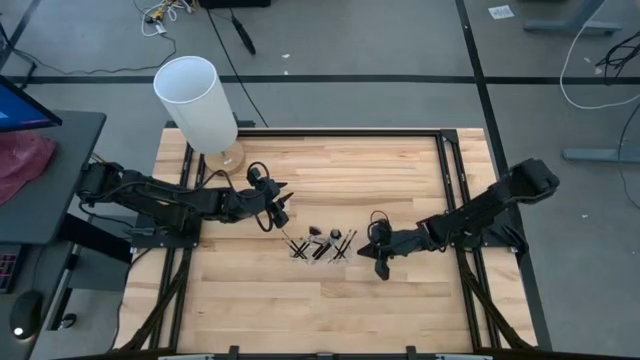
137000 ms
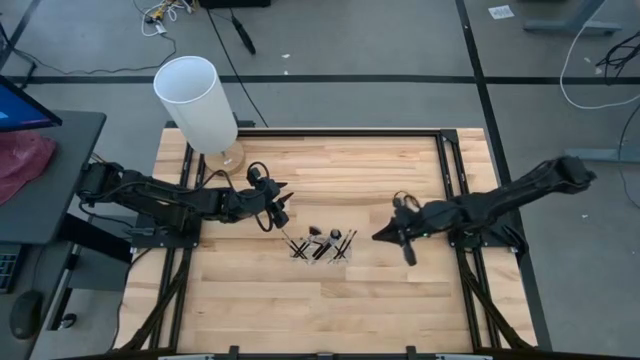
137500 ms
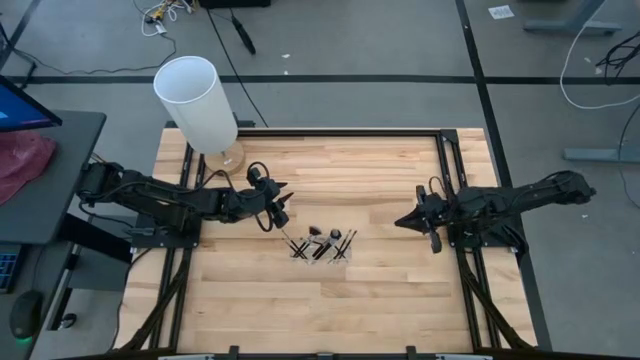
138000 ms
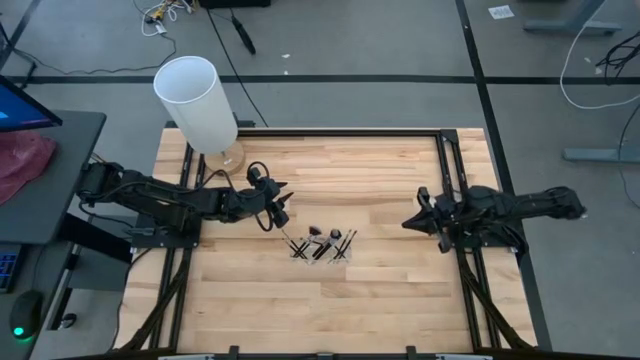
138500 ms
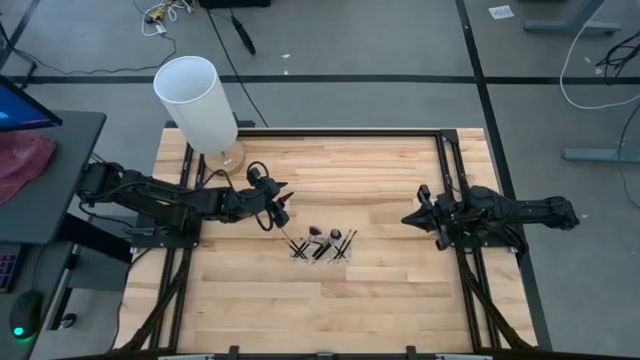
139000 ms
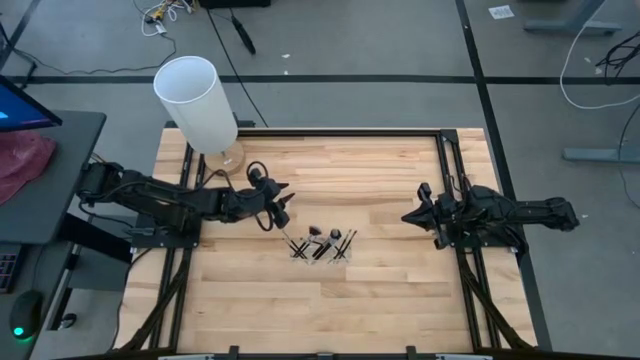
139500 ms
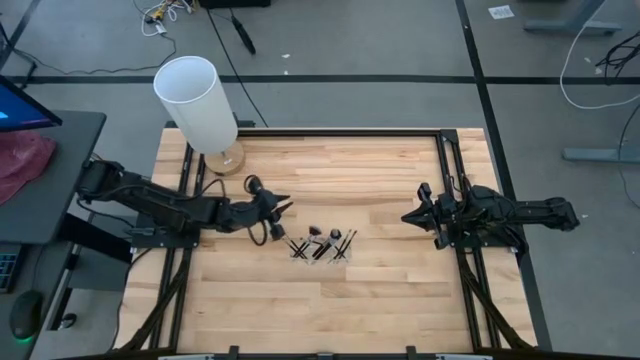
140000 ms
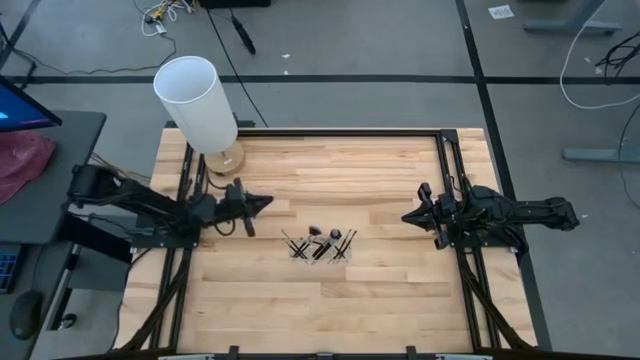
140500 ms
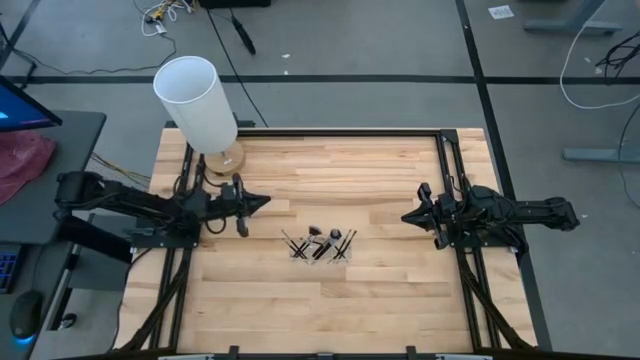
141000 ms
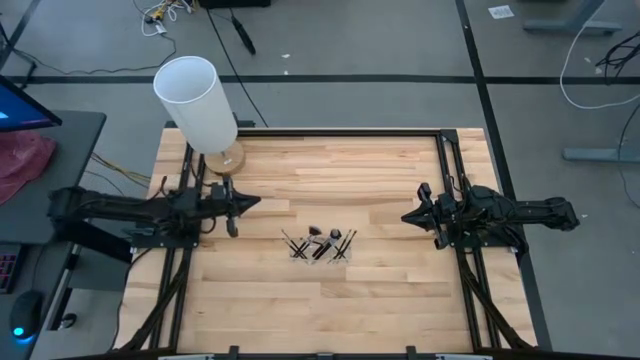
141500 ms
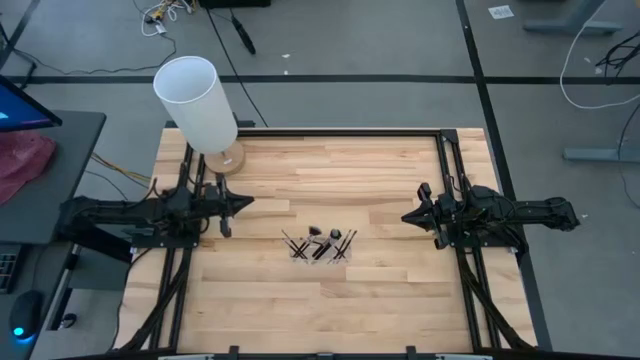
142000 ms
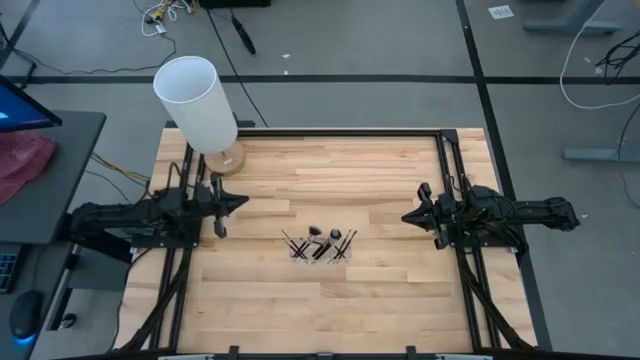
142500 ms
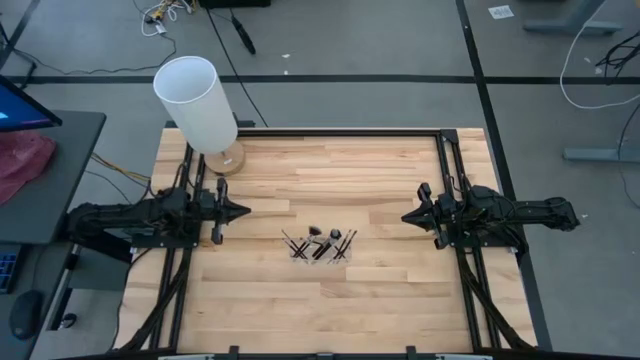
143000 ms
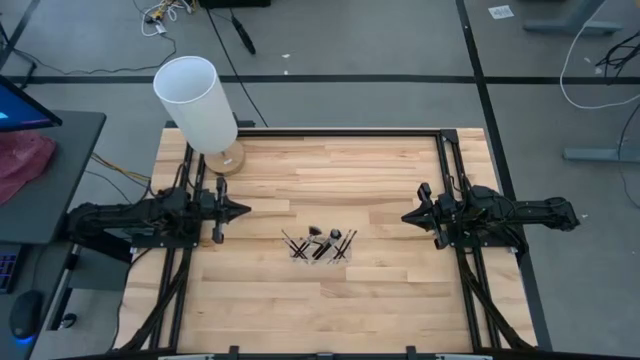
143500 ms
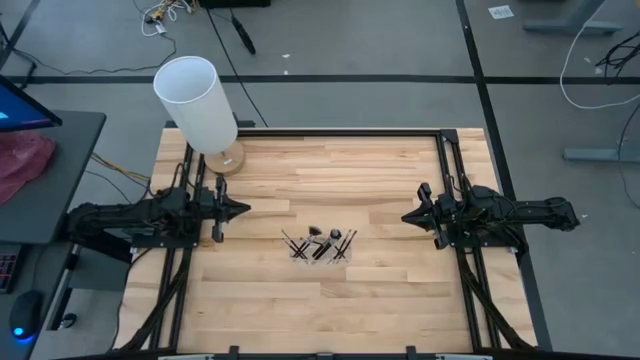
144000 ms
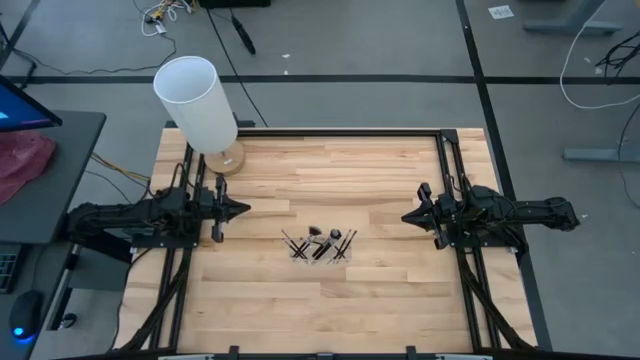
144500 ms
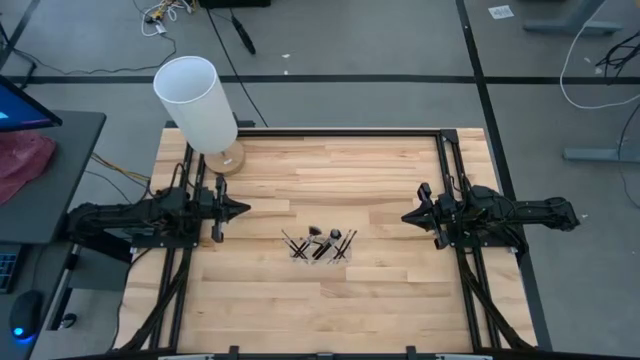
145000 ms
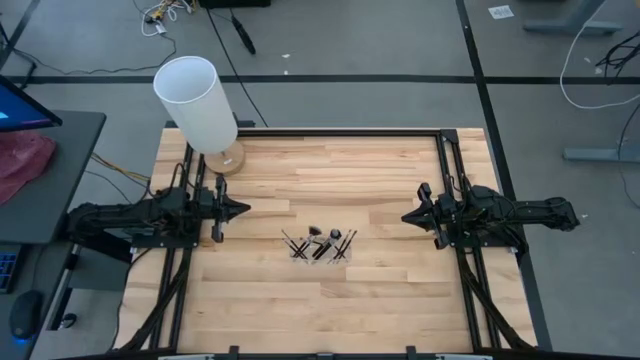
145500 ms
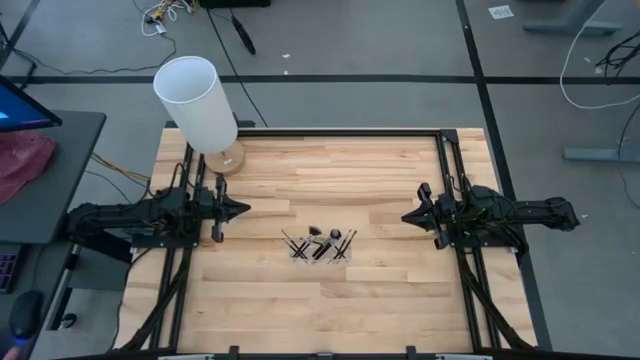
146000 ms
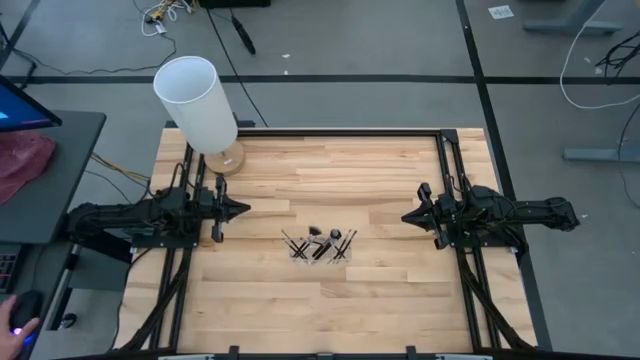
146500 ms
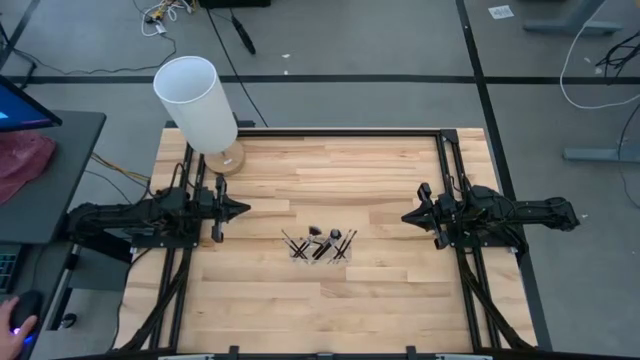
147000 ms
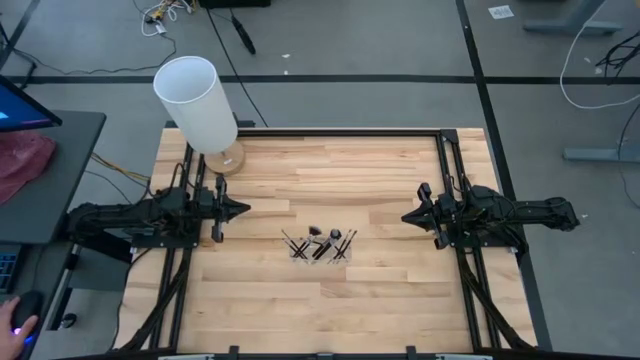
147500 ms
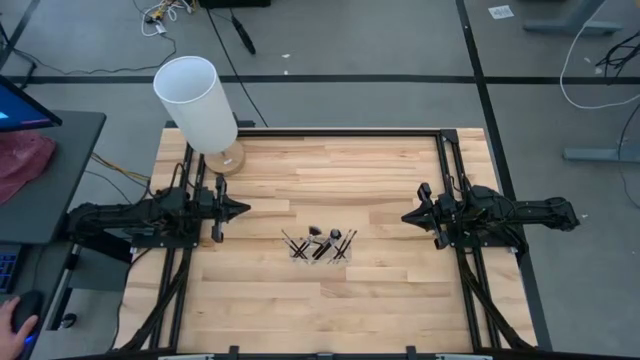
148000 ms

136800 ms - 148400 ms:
Task: Put items in baskets/containers
Return to Home Position

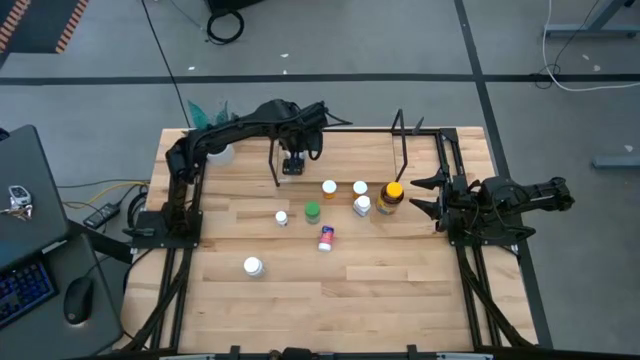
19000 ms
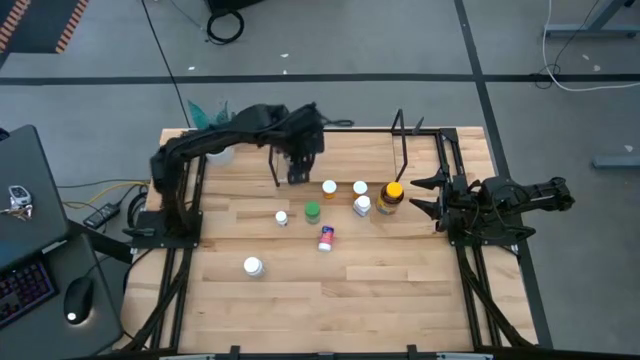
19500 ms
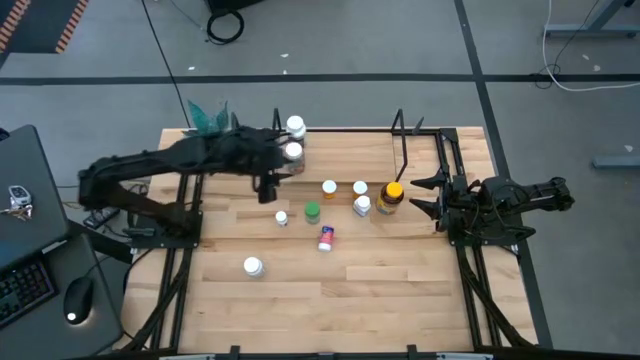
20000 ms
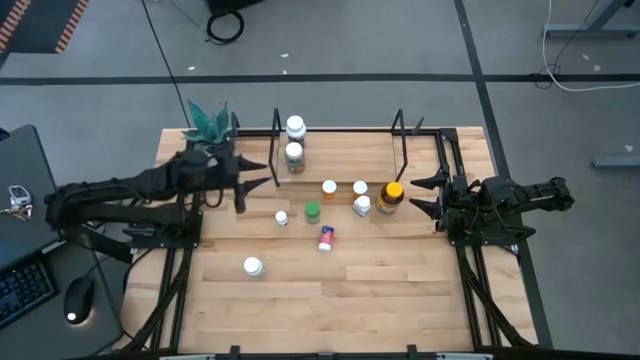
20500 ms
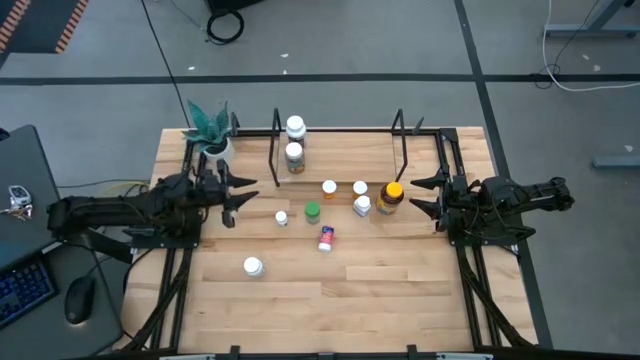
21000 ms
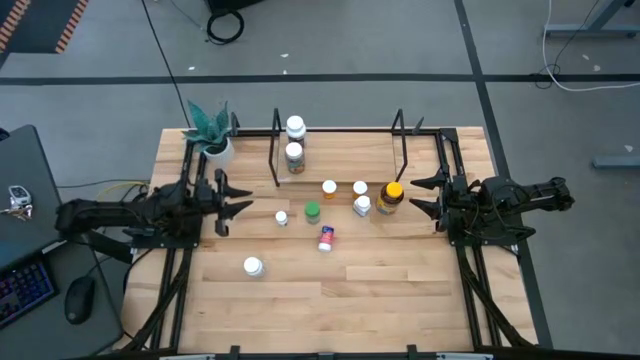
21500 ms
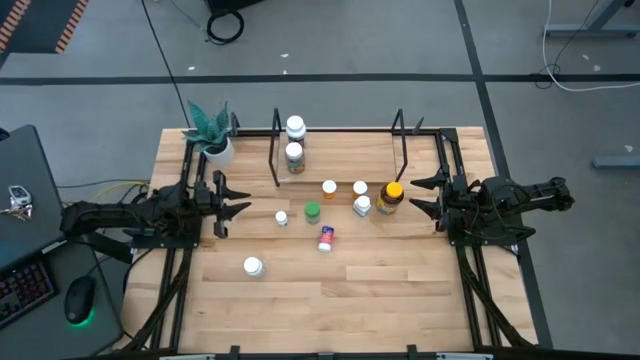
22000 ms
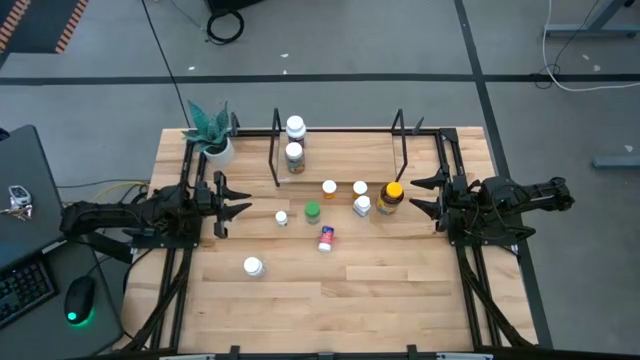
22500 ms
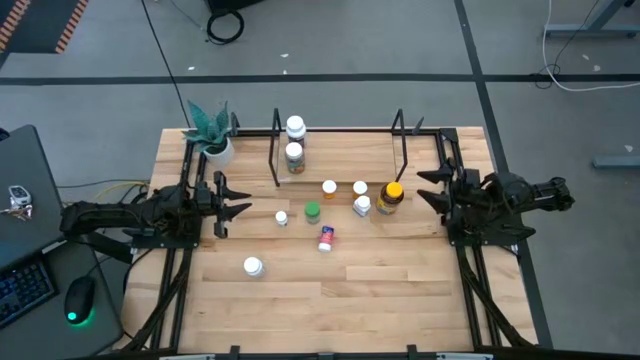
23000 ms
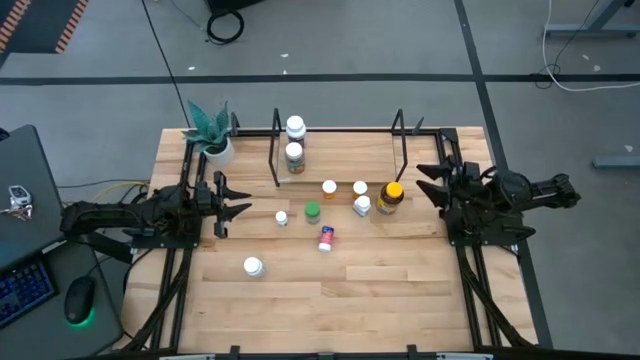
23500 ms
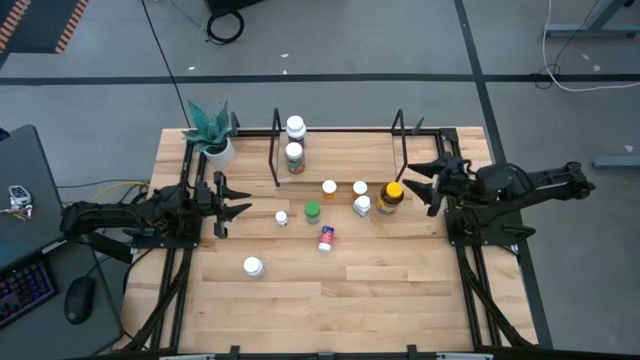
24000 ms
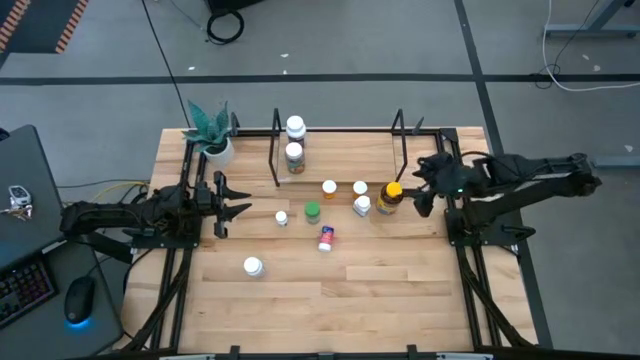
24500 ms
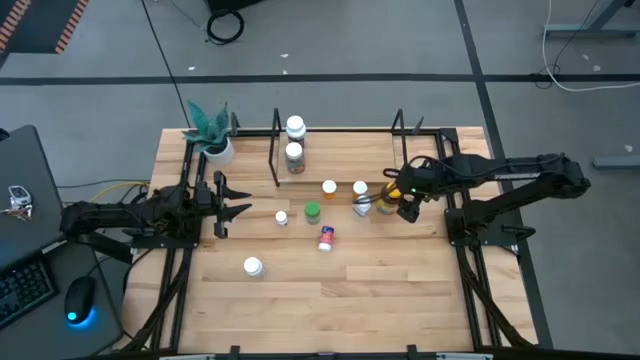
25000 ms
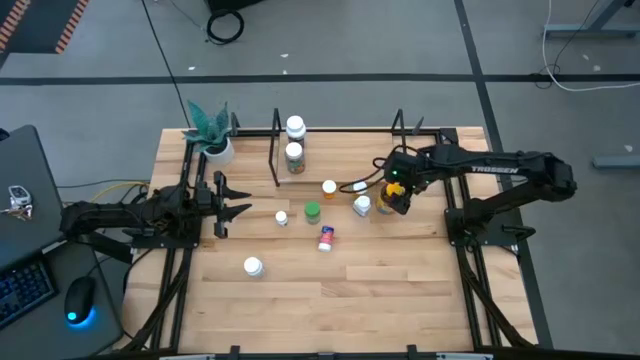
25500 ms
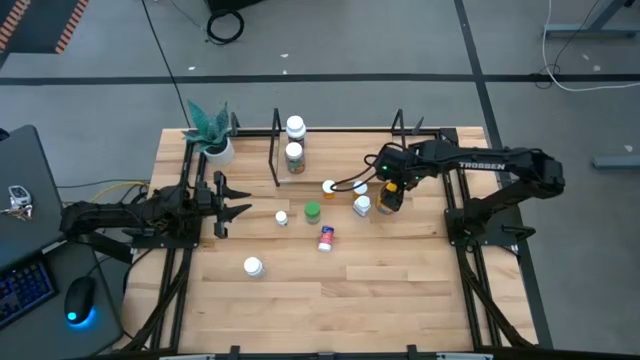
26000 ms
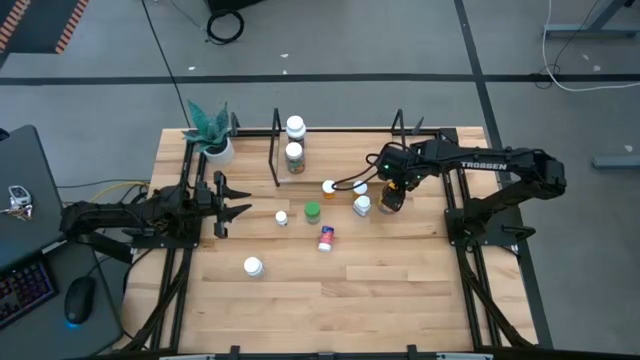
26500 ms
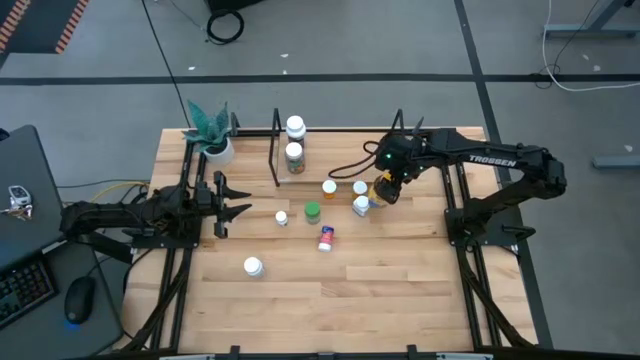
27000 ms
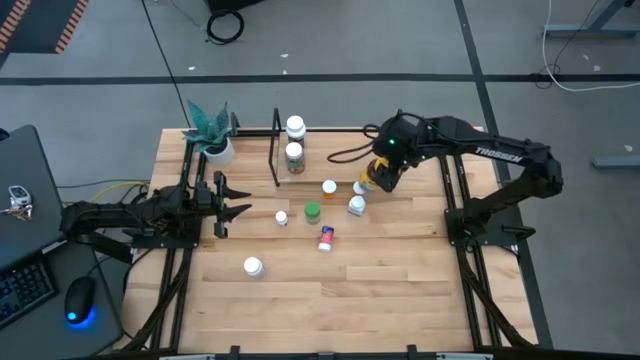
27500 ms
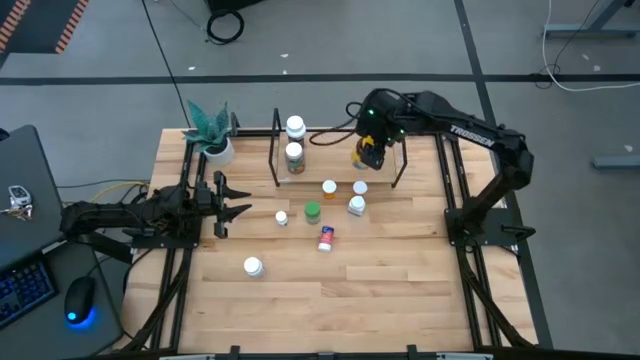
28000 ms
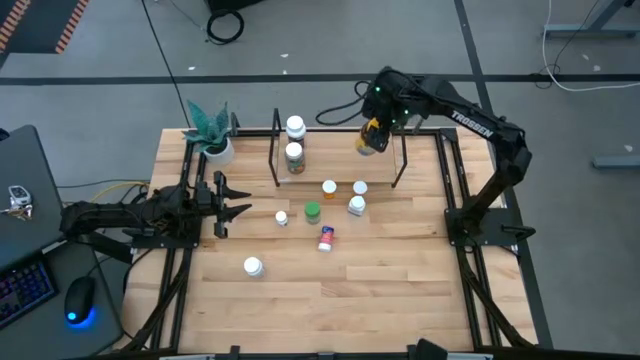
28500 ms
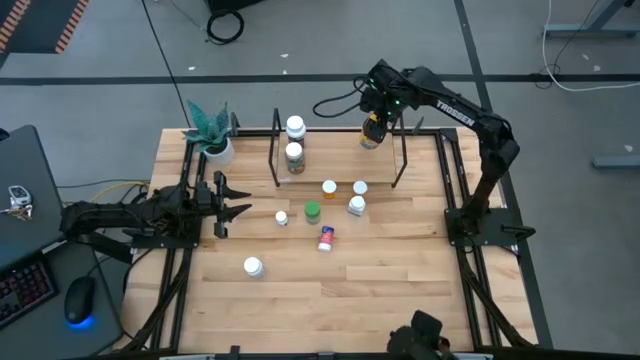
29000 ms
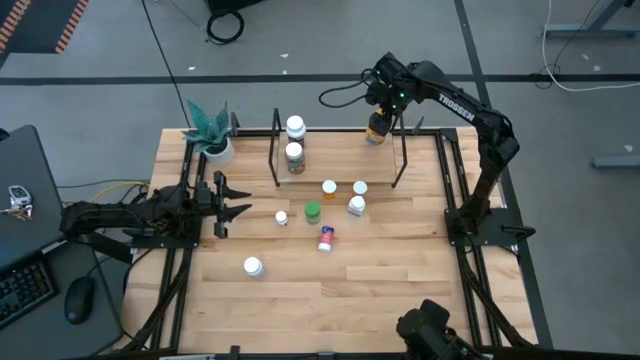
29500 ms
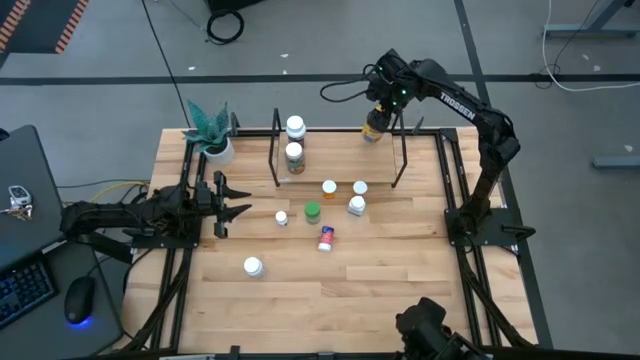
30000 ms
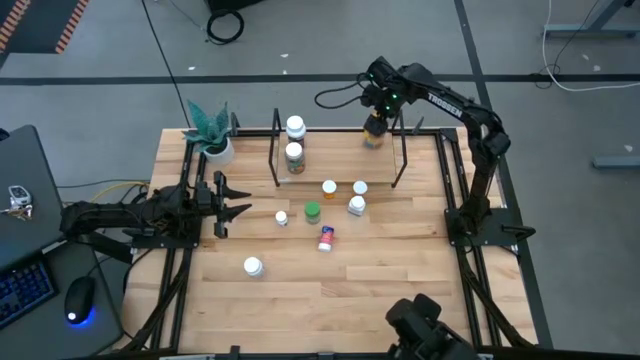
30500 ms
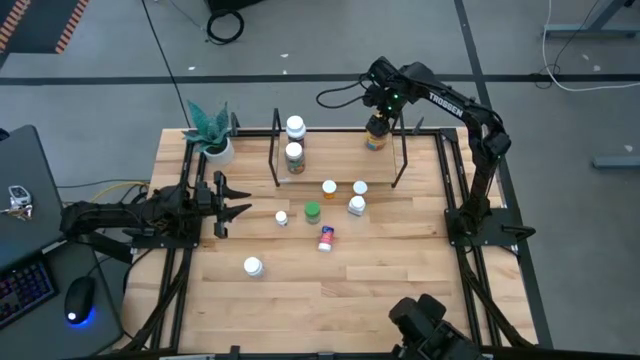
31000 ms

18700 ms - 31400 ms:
Task: Pick and place medicine bottles onto shelf by color
Put the yellow pill bottle on the shelf
